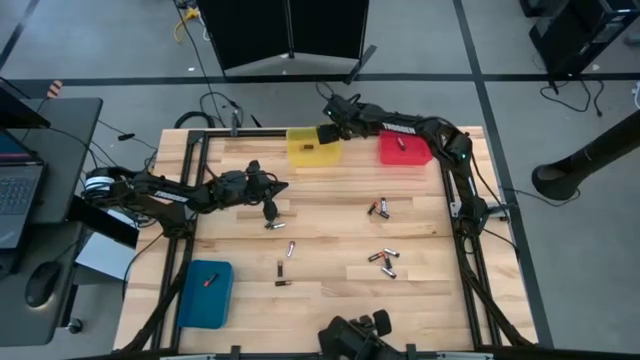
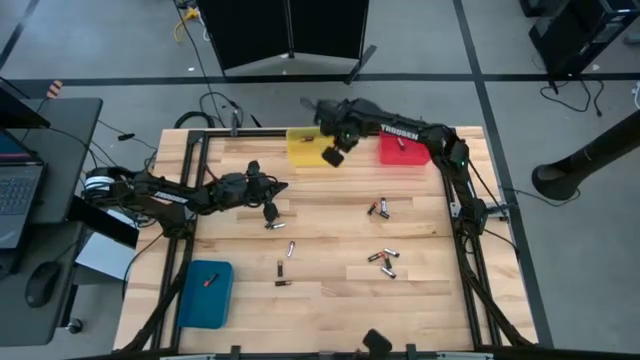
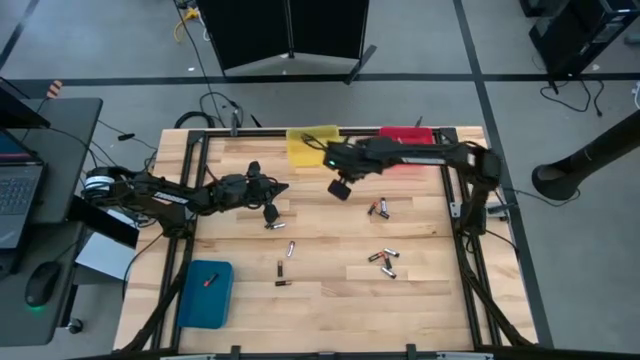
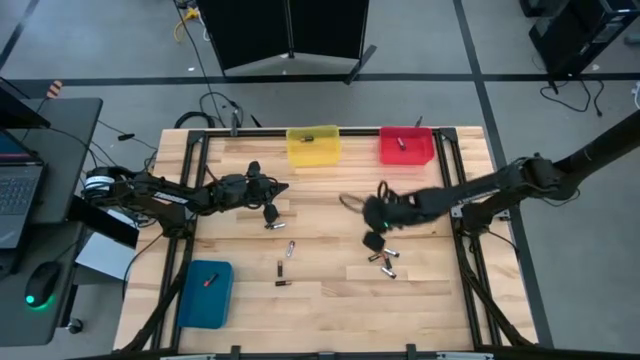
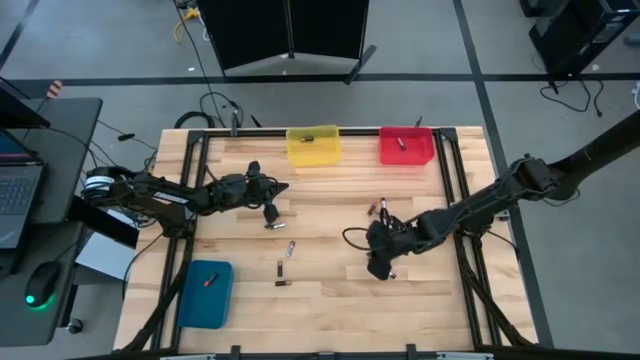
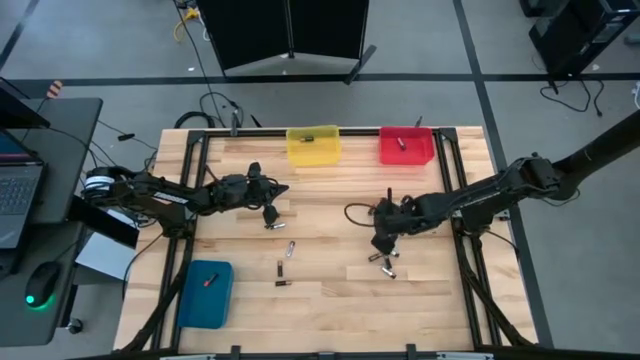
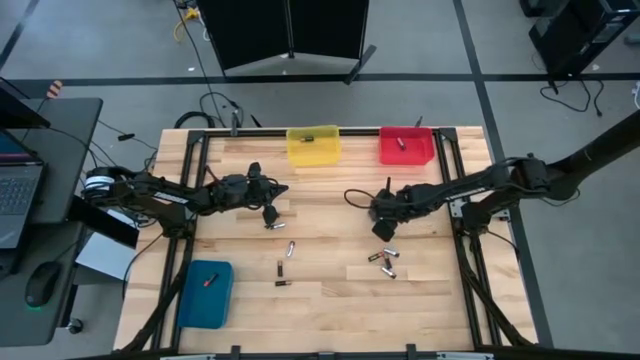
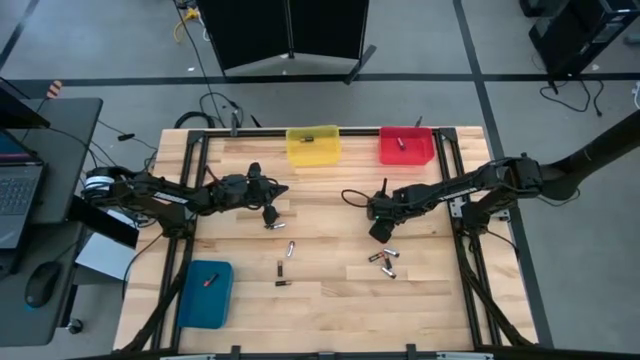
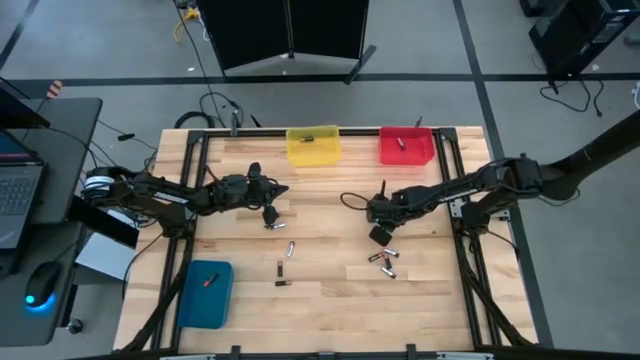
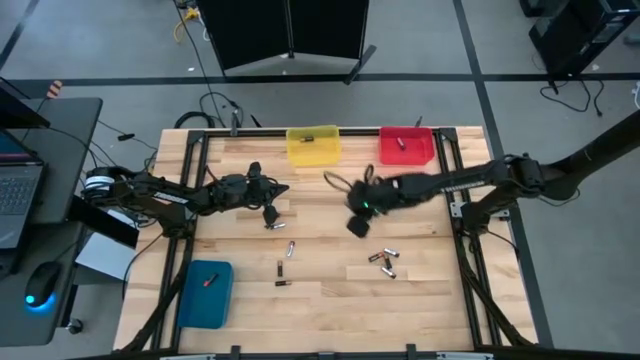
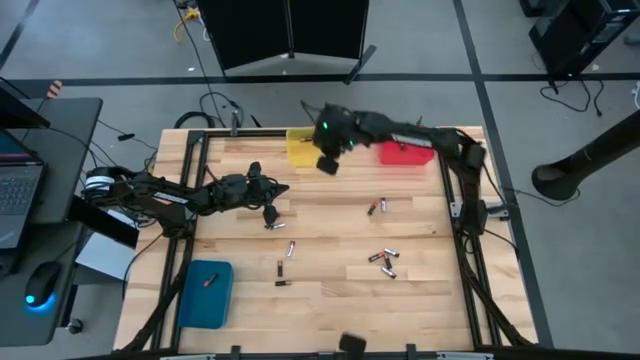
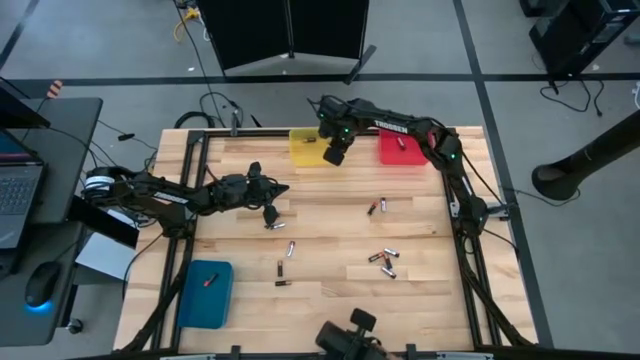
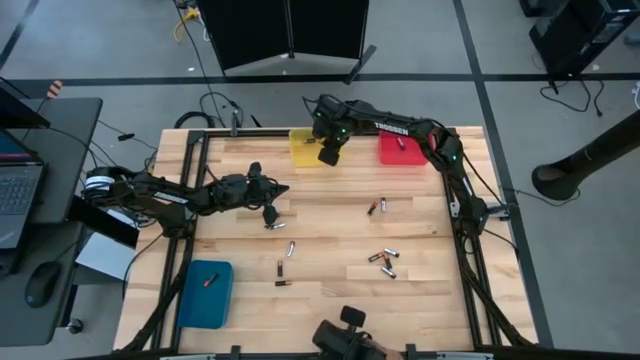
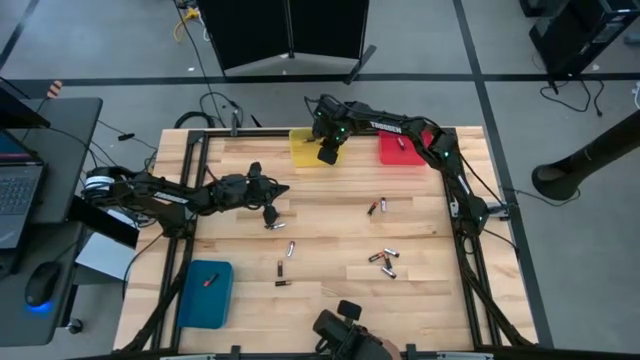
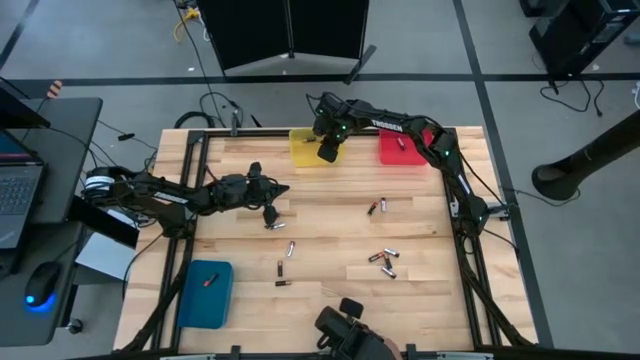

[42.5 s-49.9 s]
Task: Sort batteries
Put the black-brown battery into the yellow bin

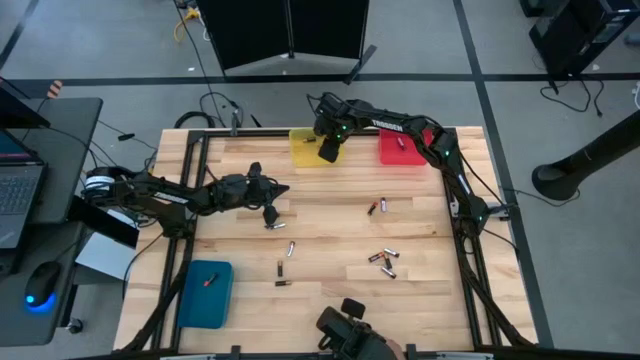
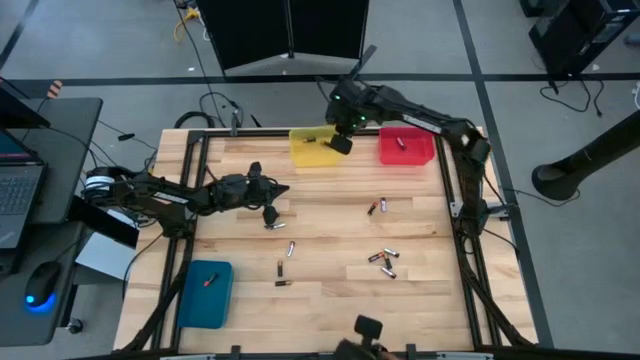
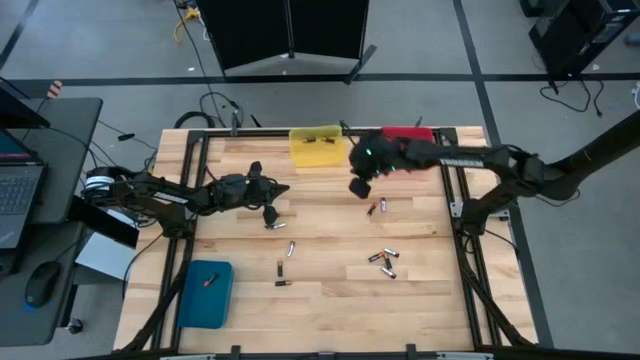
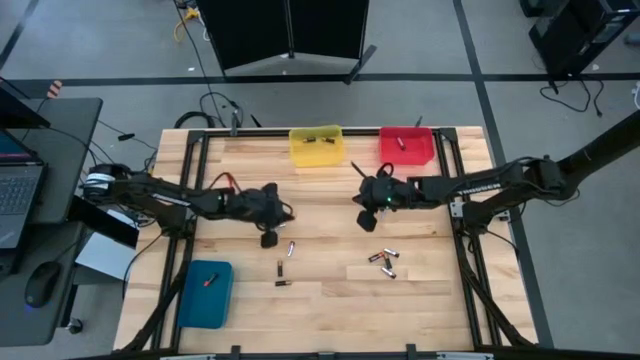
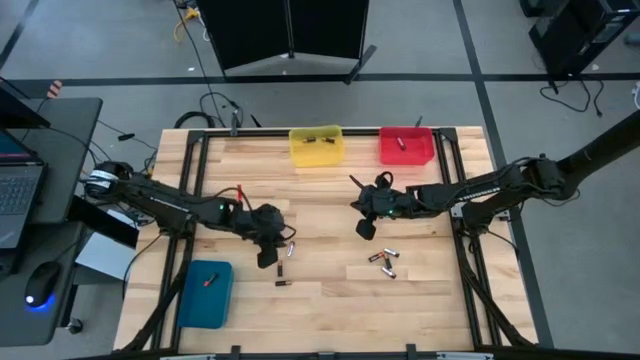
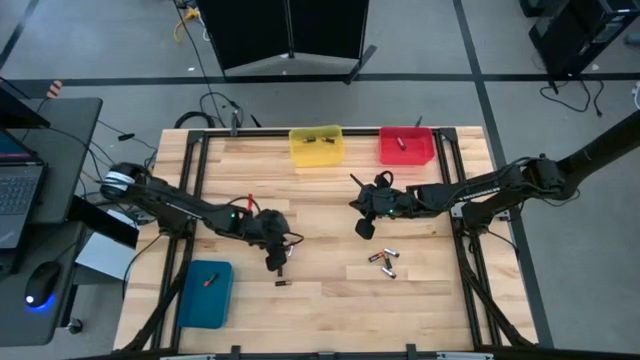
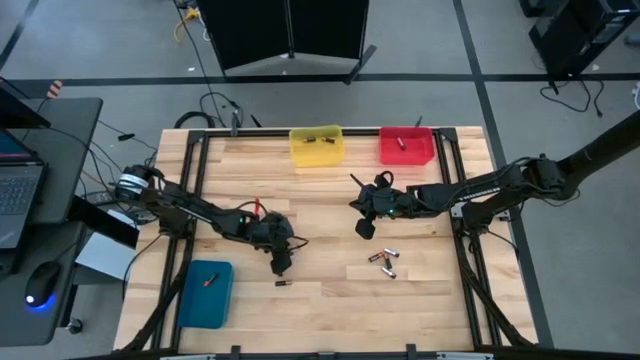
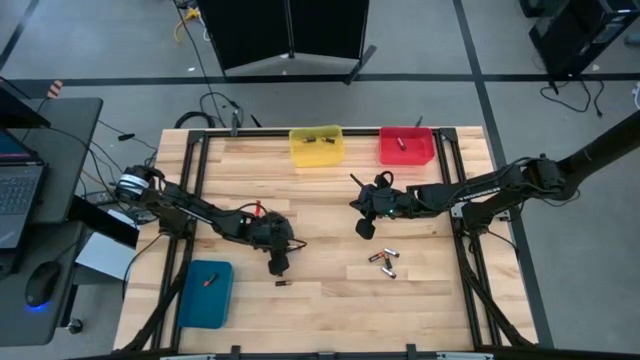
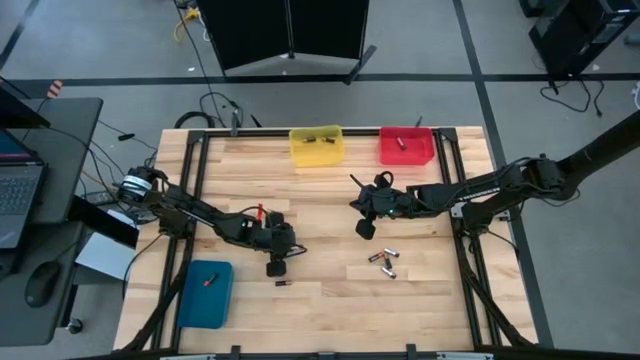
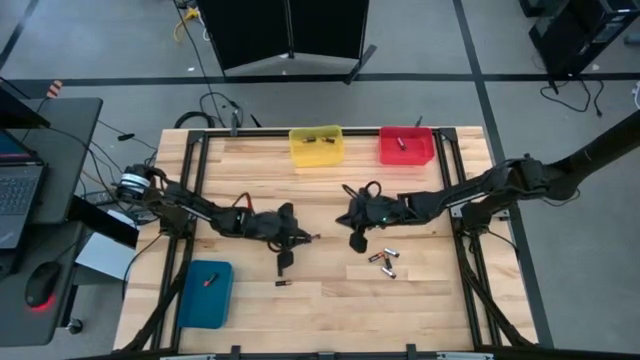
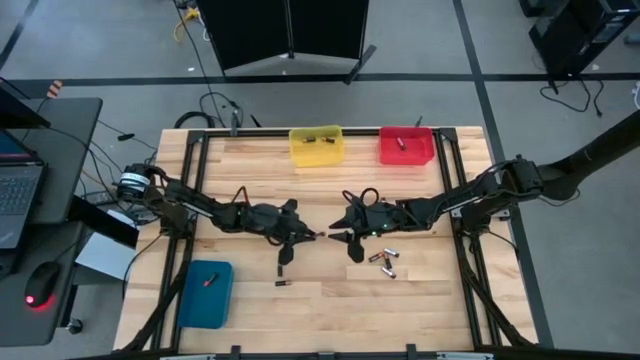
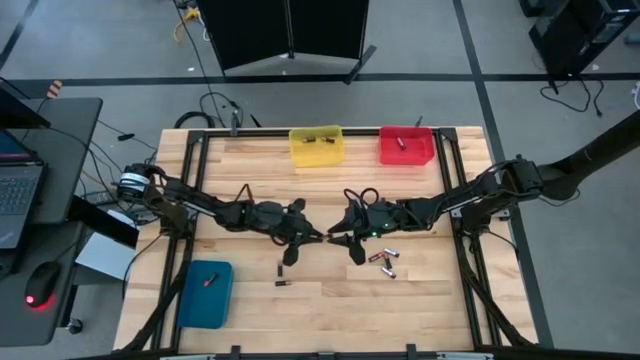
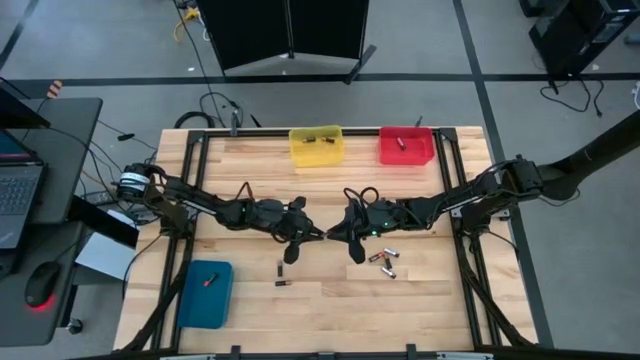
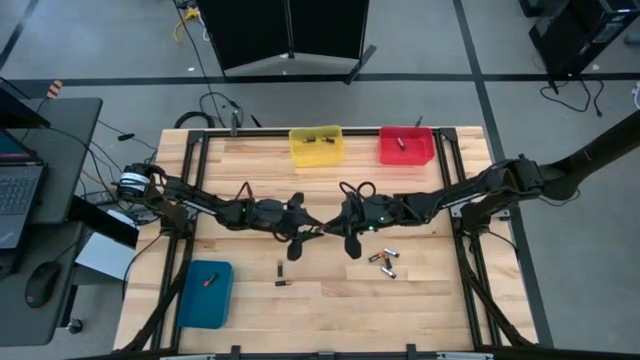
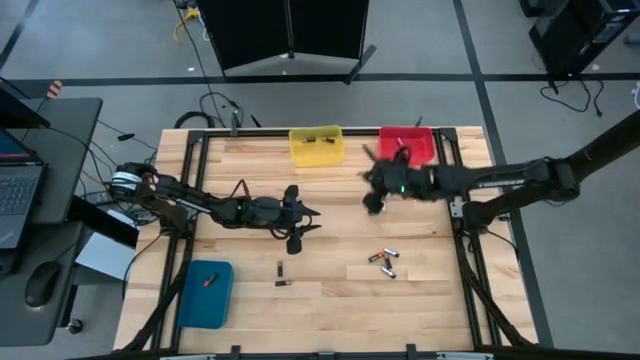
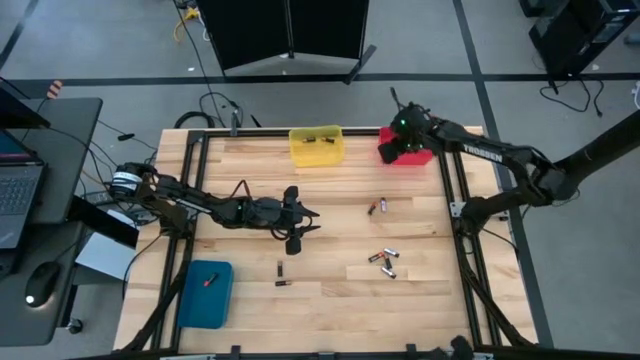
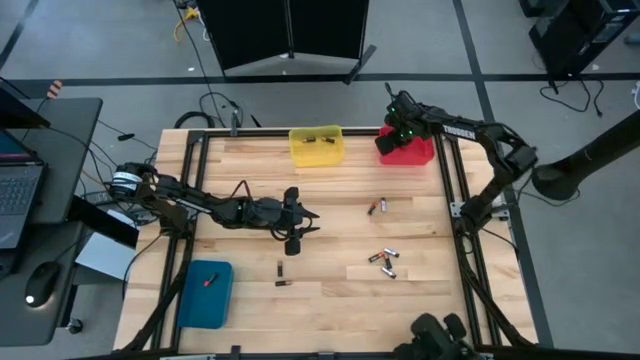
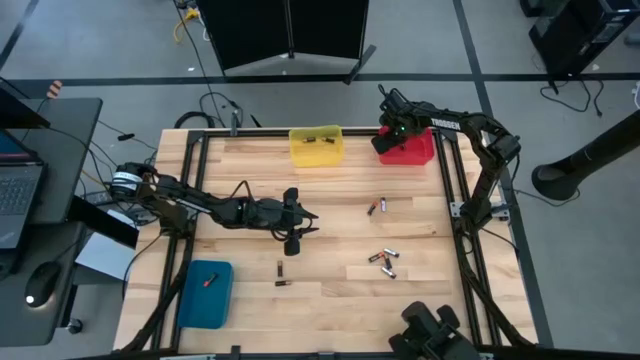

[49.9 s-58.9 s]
Put the silver battery into the red bin

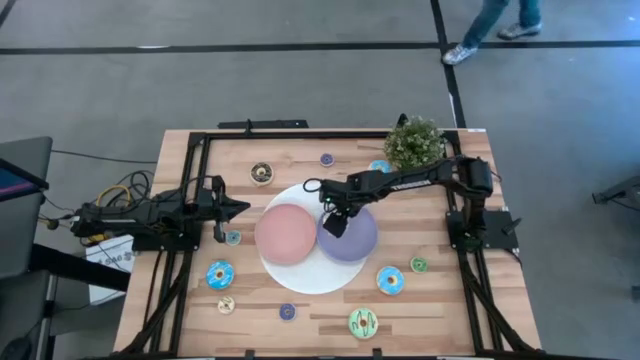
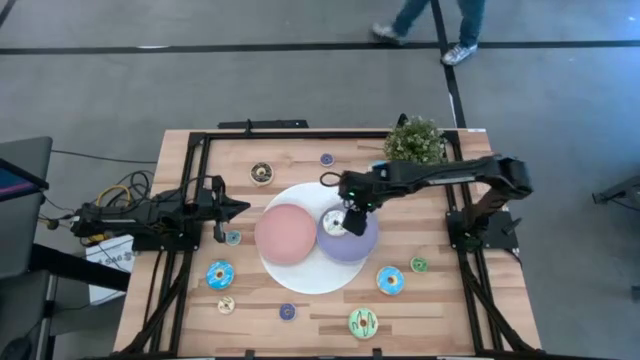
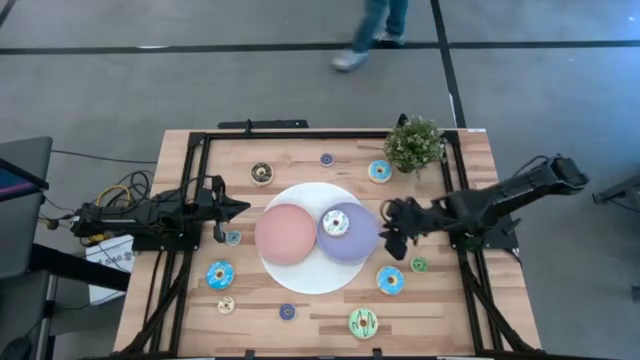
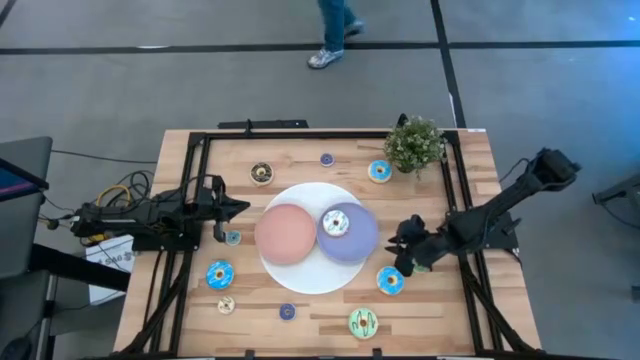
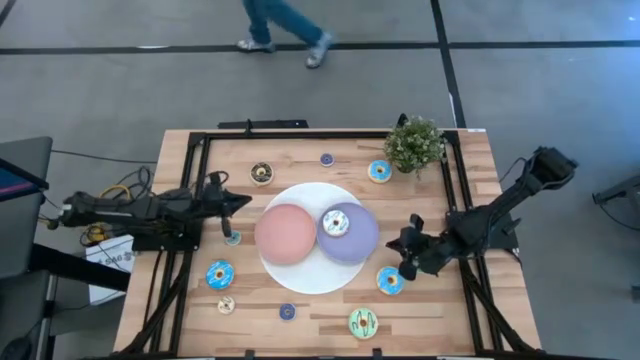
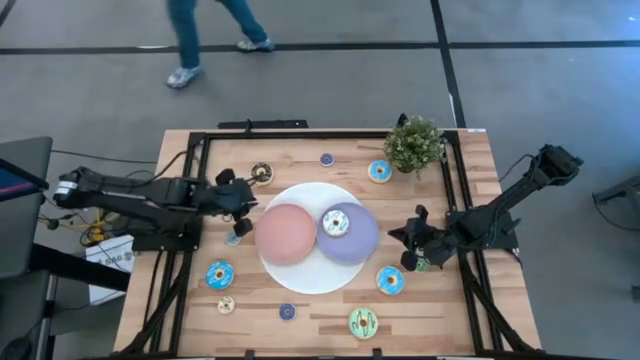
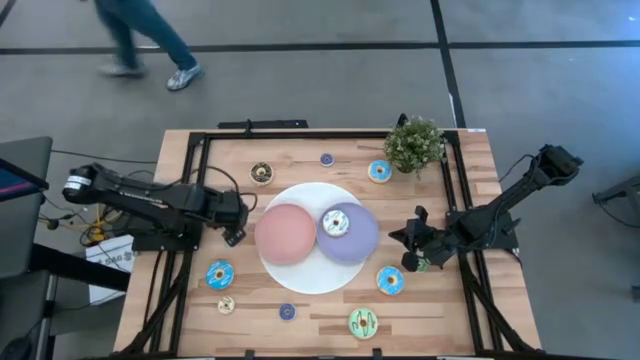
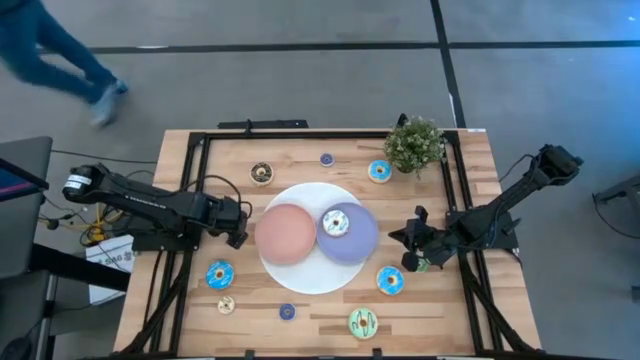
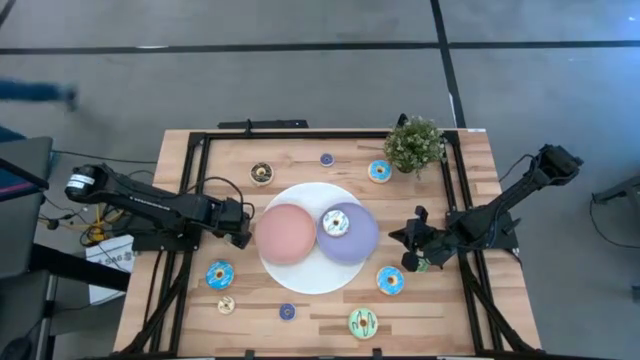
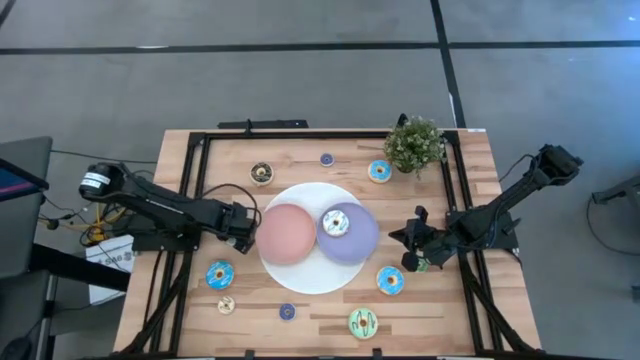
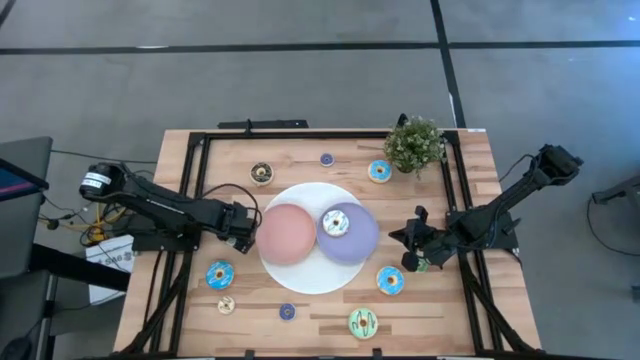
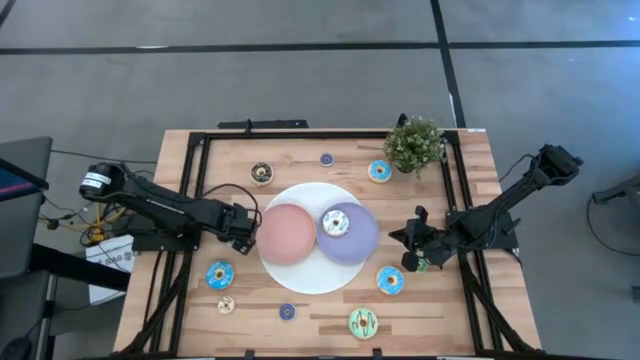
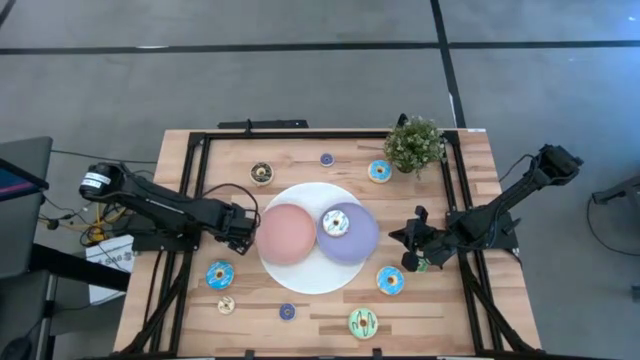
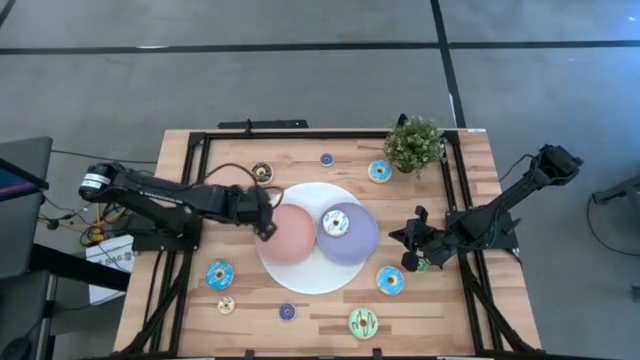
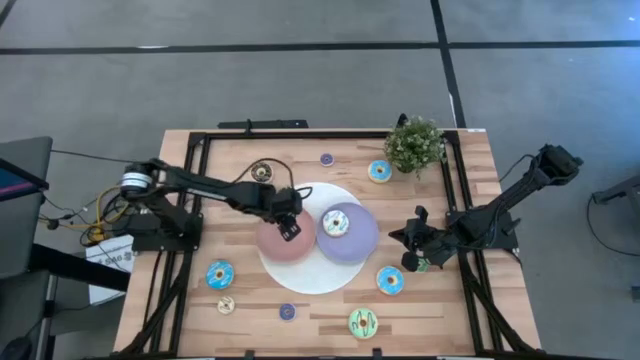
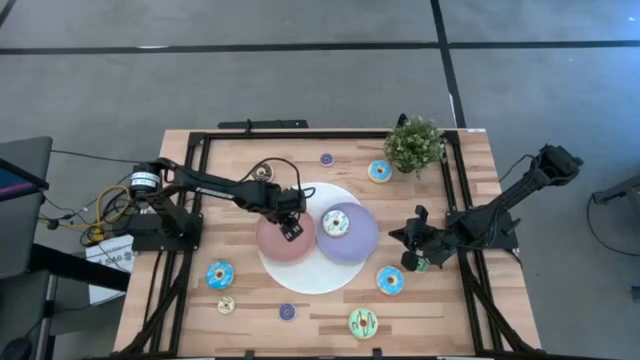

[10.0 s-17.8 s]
Task: Pick & Place donuts
Put the small blue donut on the pink plate
